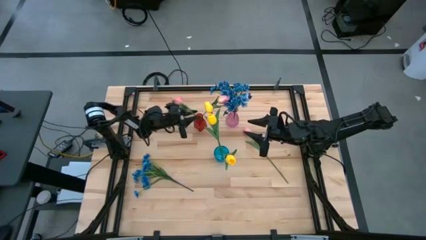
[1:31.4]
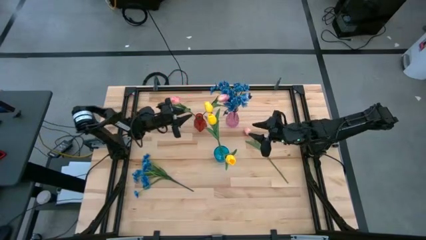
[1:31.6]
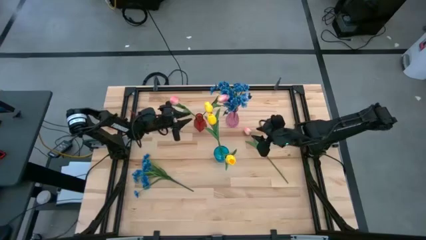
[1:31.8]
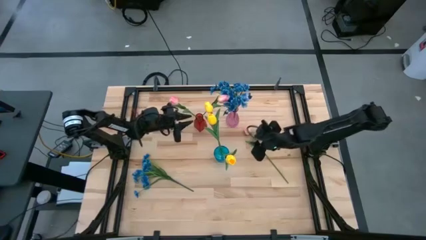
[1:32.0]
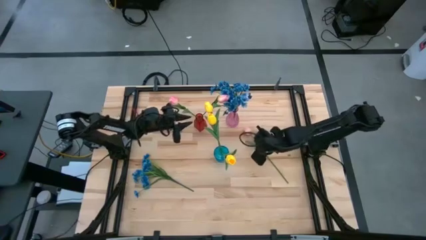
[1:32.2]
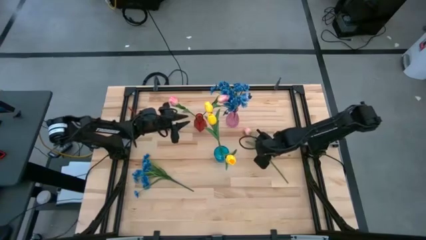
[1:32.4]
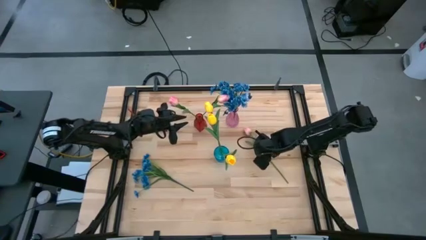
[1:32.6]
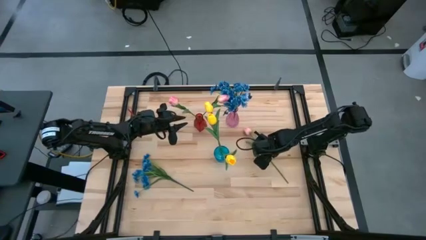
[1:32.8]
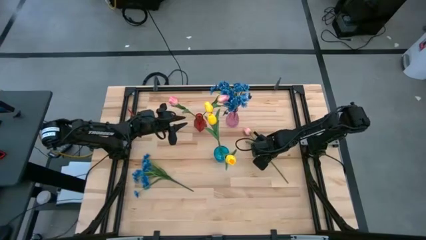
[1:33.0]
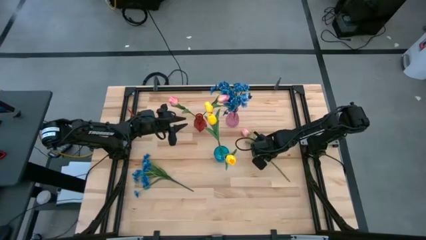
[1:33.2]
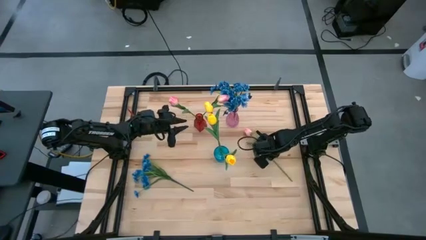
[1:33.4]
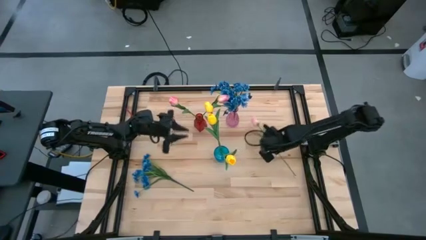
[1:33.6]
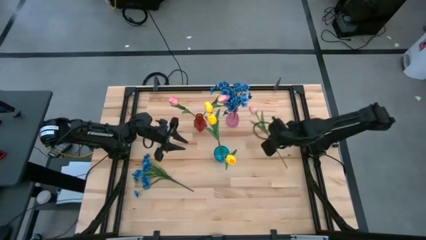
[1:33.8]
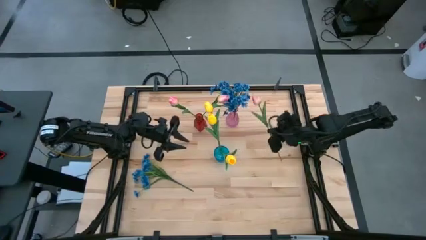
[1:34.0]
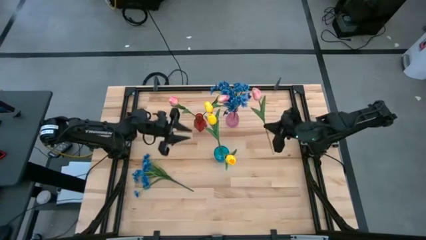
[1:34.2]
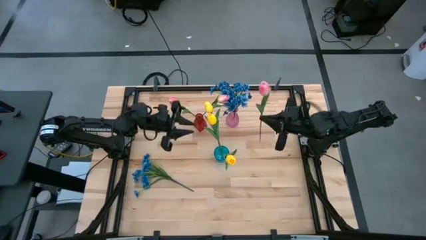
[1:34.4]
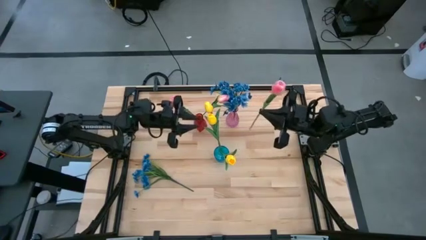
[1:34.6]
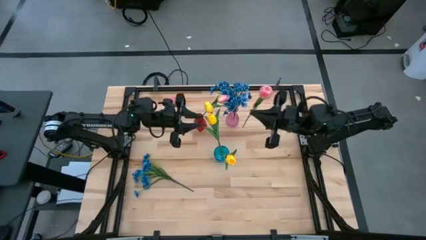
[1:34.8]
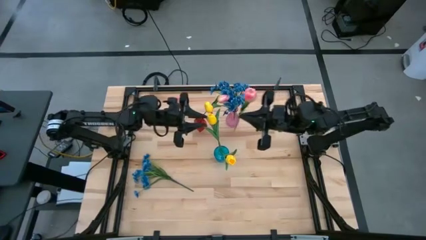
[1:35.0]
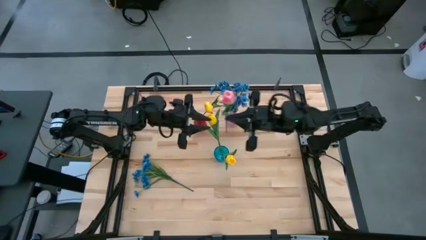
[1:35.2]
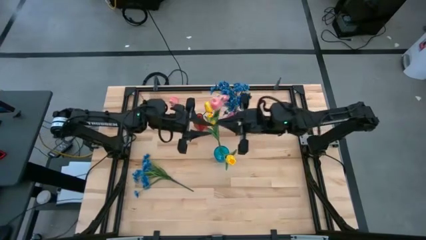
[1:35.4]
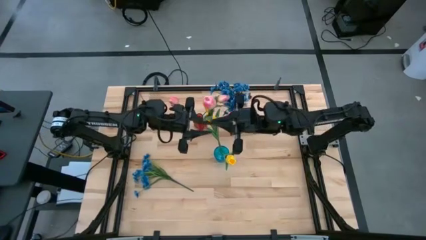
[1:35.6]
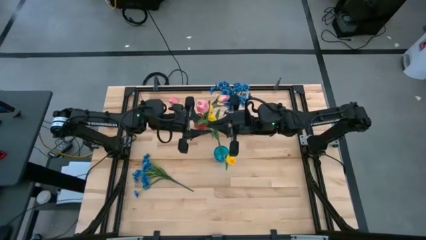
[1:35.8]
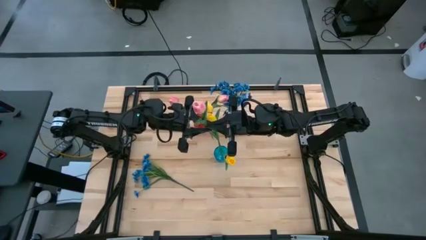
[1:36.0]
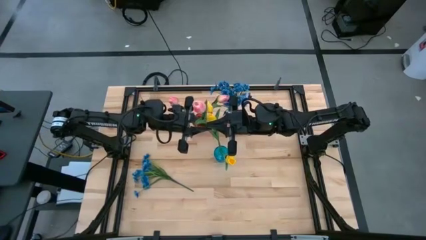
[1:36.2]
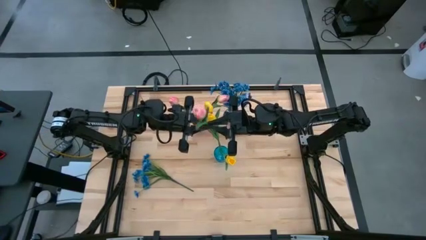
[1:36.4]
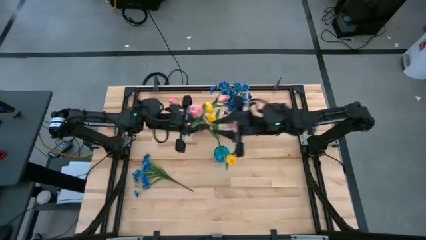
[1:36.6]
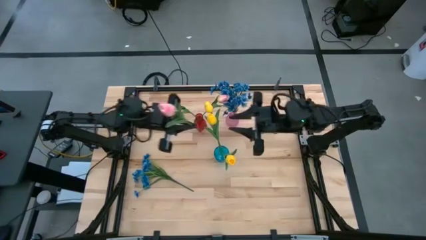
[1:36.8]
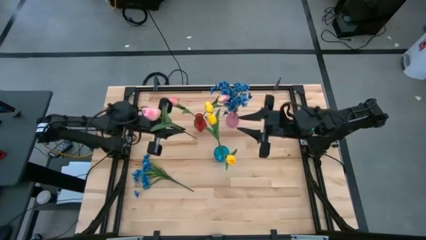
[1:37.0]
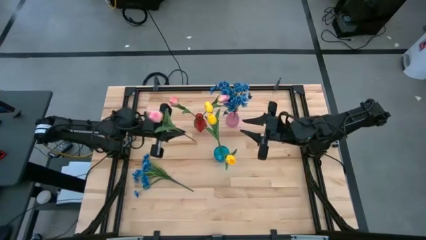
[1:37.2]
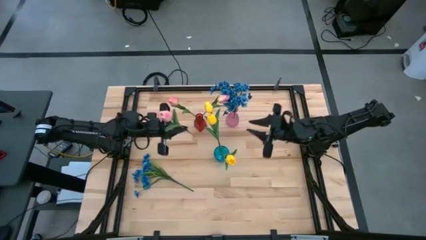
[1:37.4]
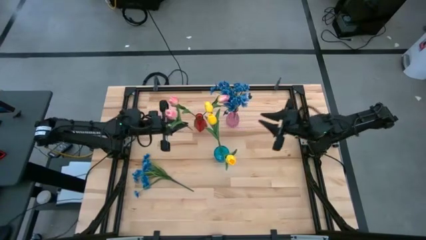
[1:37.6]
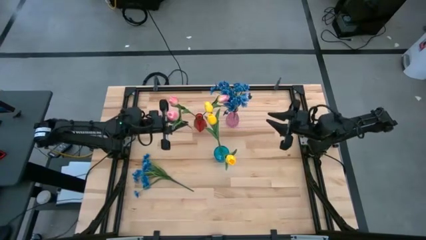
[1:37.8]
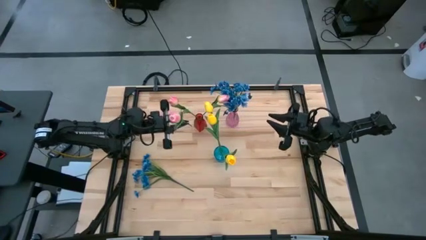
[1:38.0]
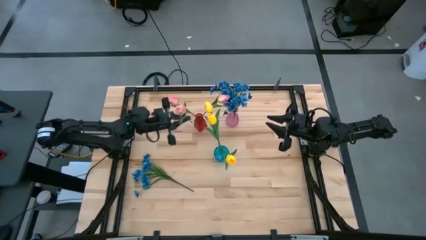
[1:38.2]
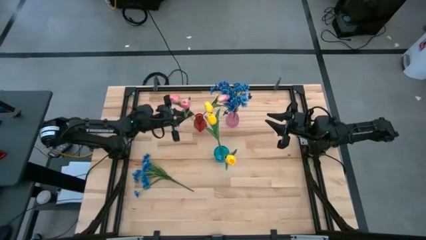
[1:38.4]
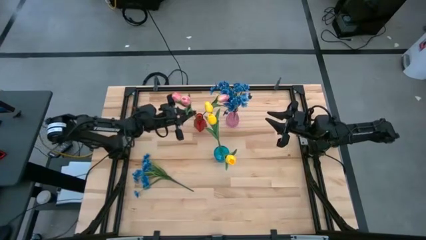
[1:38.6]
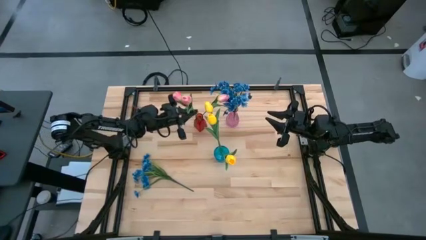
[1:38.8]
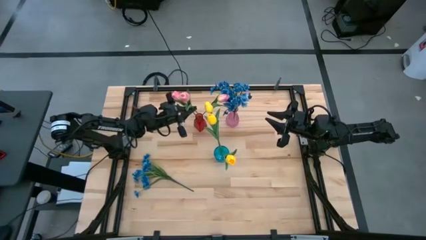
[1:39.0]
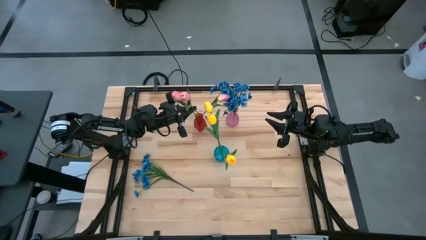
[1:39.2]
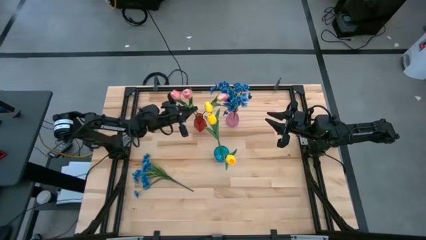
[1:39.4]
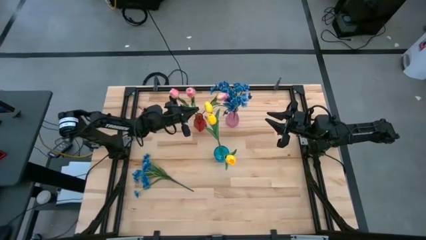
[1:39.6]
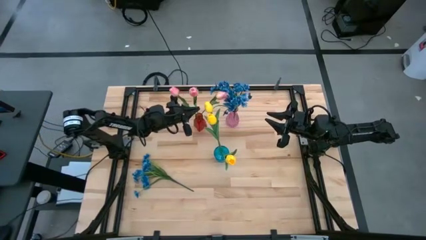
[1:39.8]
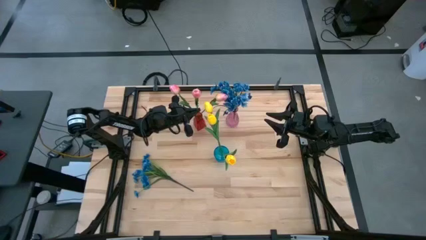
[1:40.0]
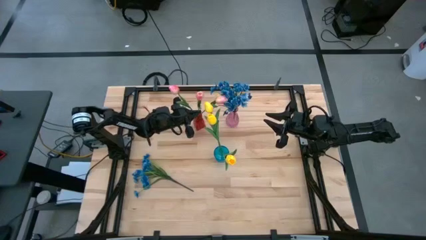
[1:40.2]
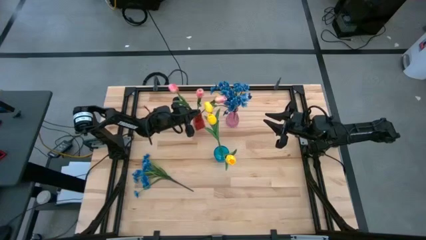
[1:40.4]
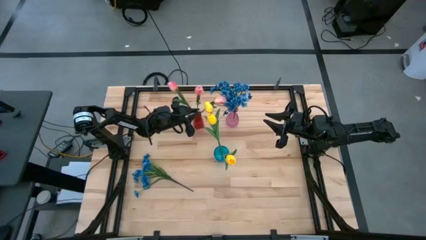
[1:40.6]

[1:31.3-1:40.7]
Task: Sort flowers into vase by color
Put the pink flower into the red vase

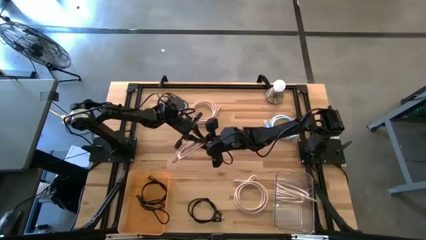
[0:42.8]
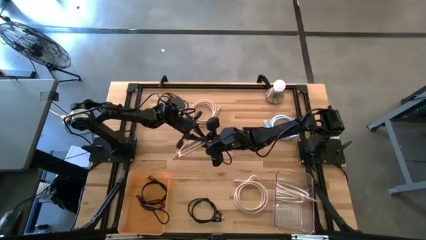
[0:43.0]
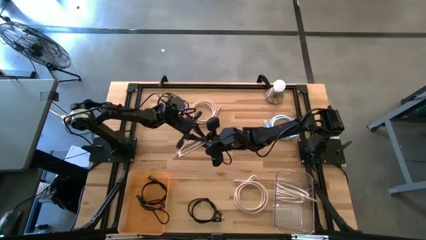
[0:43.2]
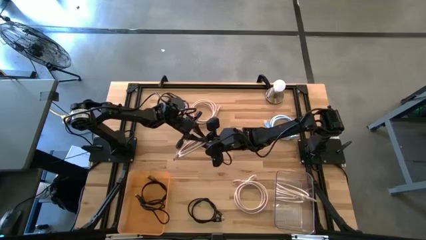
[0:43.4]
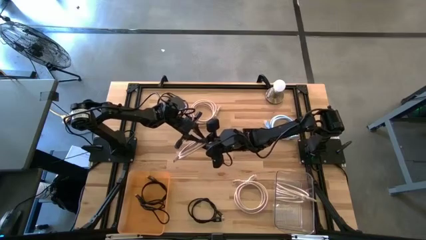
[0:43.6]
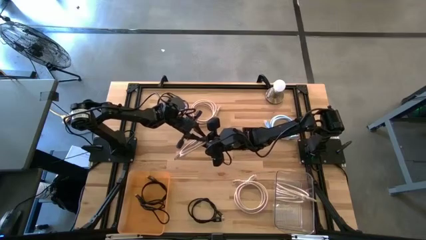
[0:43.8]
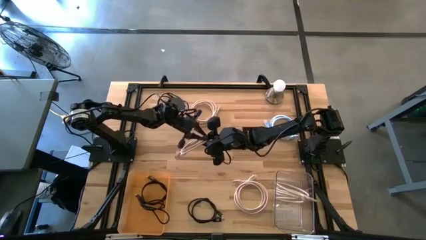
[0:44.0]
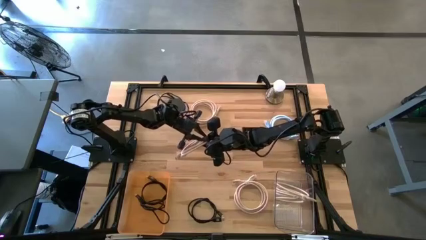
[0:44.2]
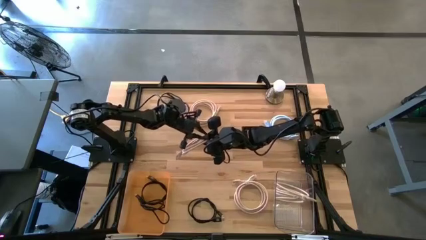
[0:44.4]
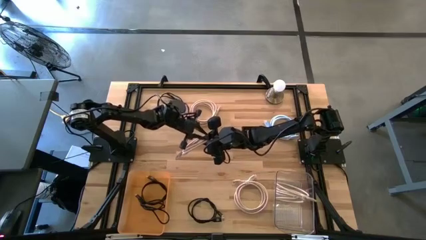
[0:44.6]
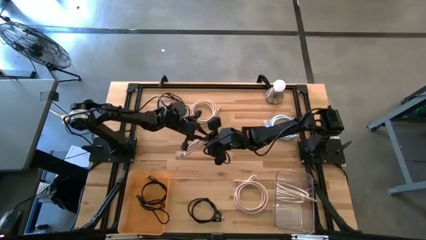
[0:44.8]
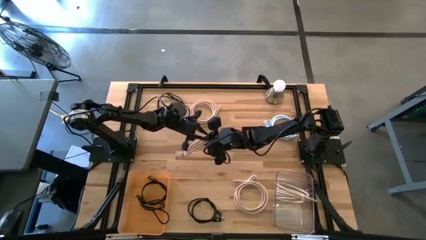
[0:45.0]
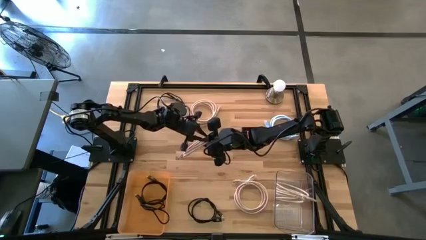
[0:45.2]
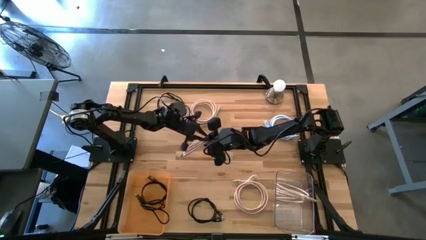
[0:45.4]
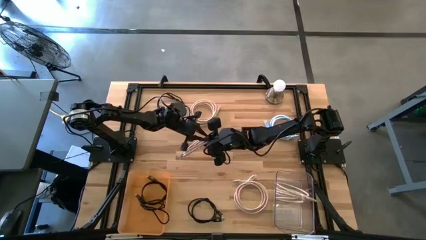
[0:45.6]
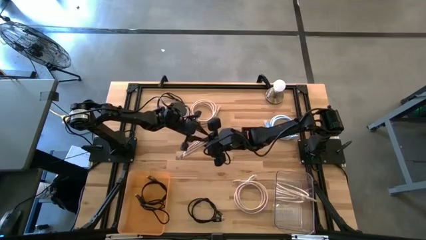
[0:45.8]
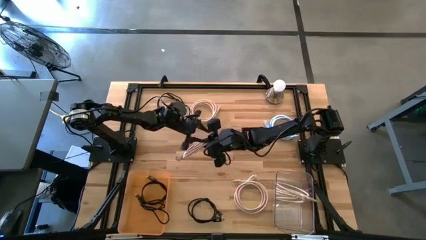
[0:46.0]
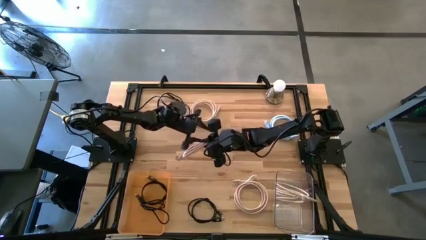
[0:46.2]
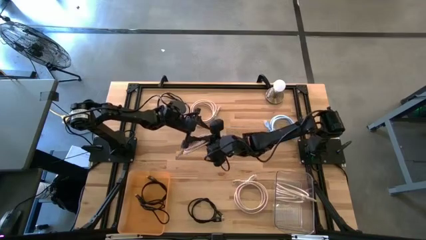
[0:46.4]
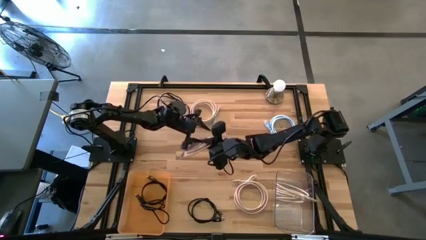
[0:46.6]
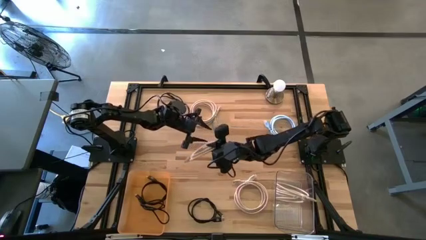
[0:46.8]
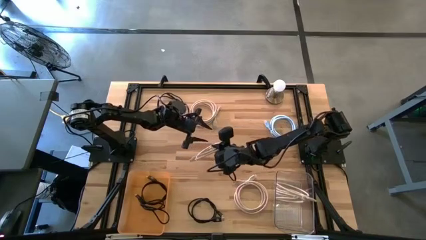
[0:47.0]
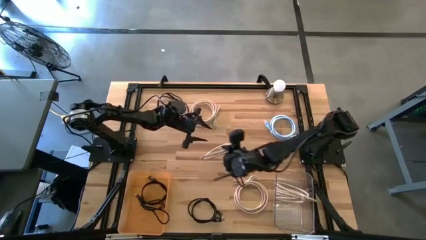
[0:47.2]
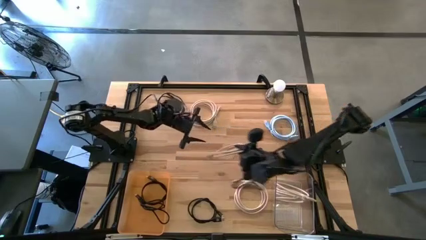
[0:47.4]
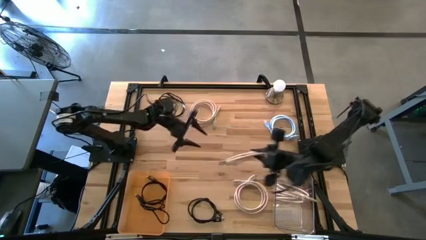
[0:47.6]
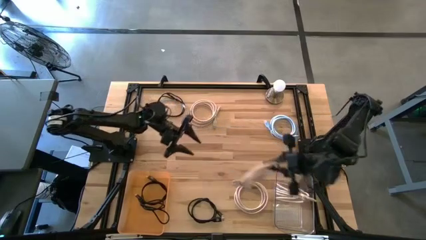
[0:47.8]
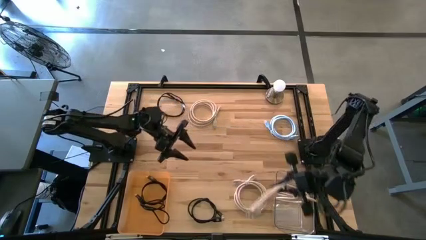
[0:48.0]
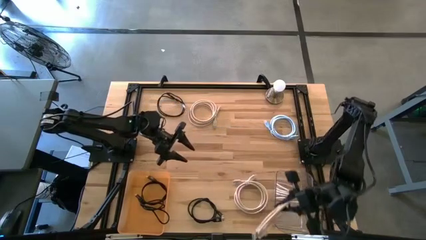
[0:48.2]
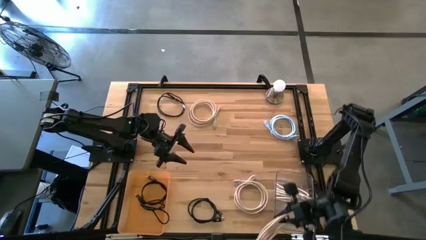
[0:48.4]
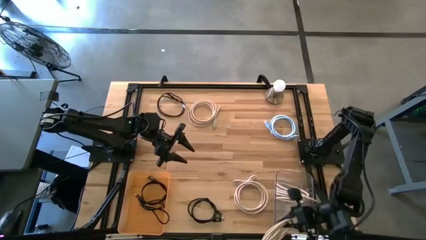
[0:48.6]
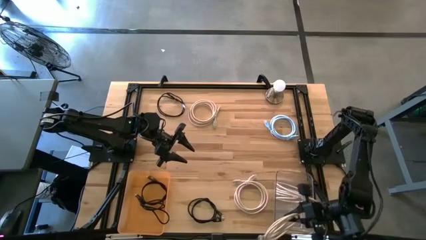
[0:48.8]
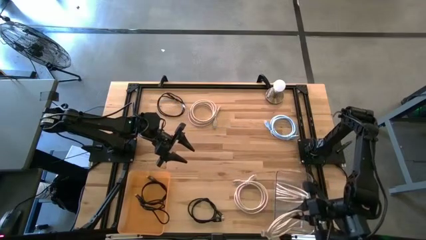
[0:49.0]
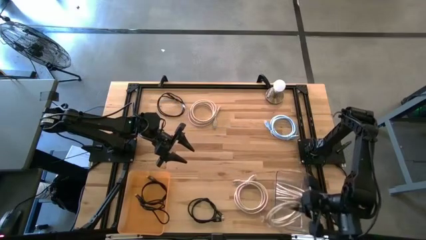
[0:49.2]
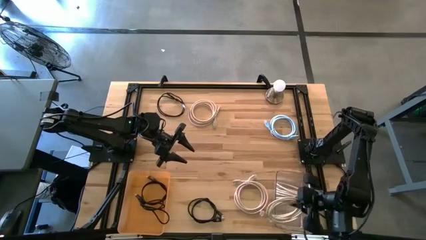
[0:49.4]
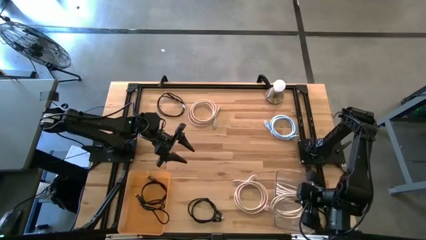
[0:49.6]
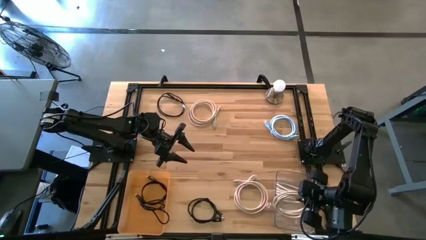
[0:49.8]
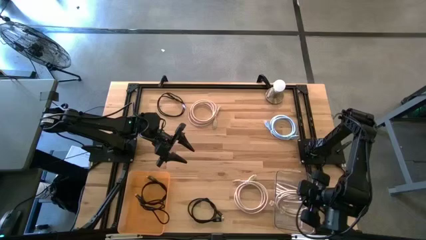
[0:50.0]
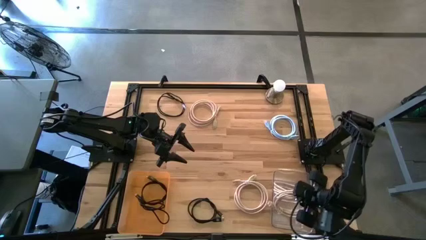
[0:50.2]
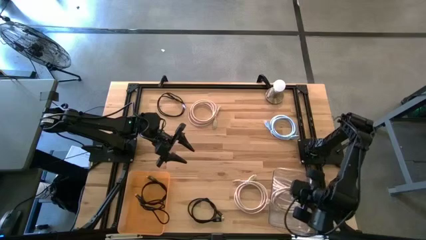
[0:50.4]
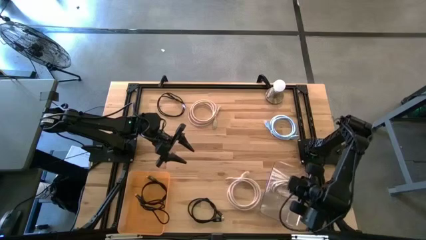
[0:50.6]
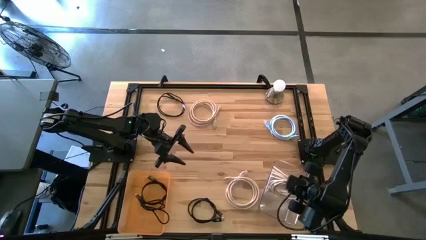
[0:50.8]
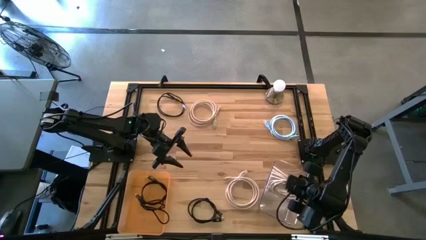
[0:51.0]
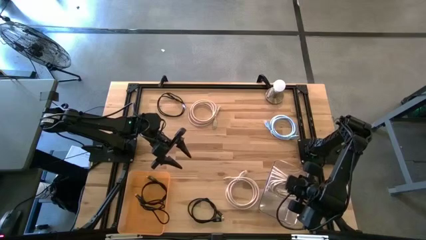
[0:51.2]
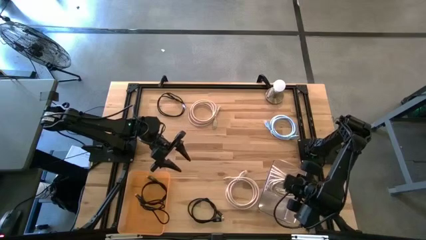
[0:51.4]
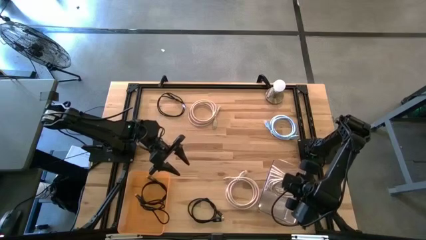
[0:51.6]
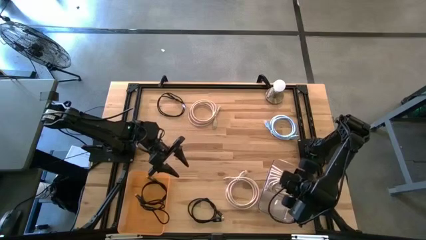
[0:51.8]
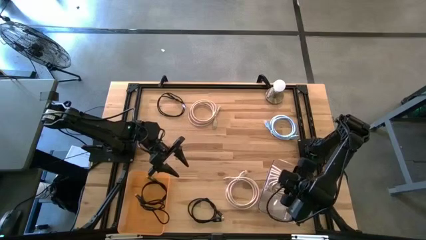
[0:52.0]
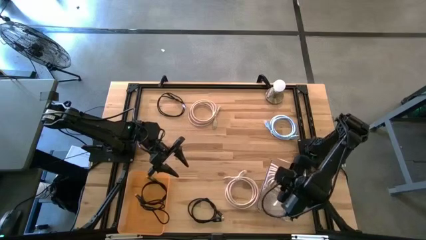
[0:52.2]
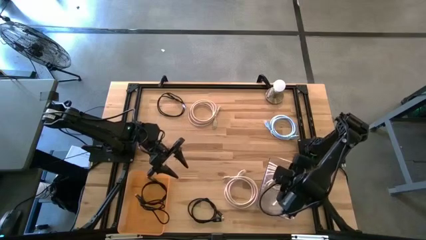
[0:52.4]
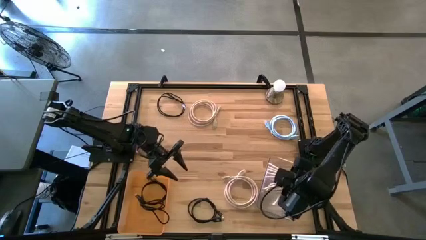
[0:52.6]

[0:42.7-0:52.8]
Task: Sort HDMI cables
Put the white HDMI cable into the transparent bin
